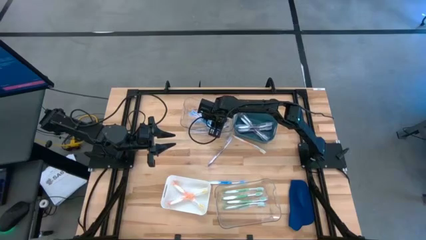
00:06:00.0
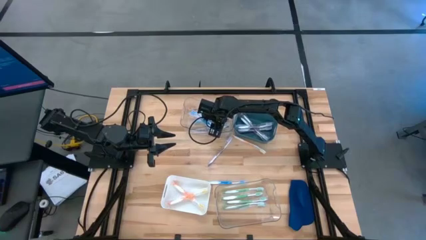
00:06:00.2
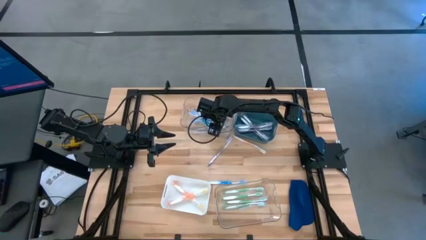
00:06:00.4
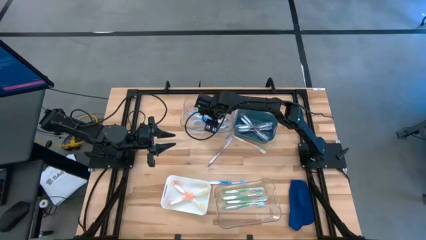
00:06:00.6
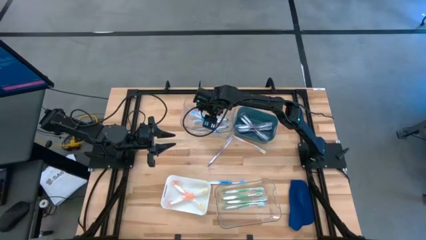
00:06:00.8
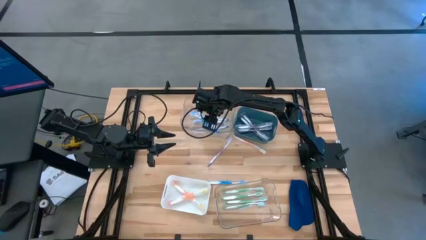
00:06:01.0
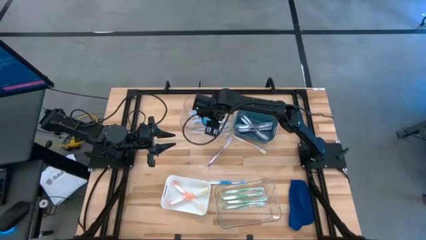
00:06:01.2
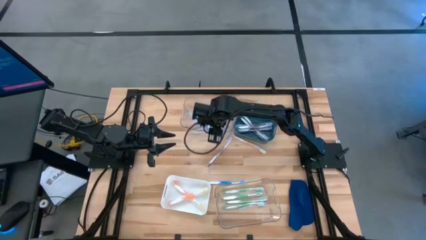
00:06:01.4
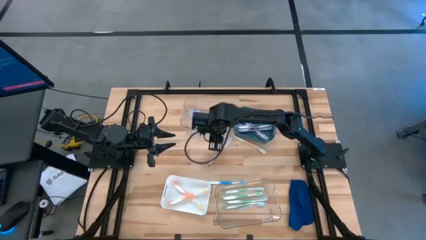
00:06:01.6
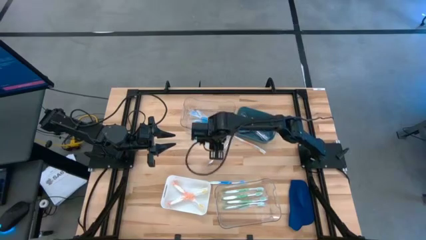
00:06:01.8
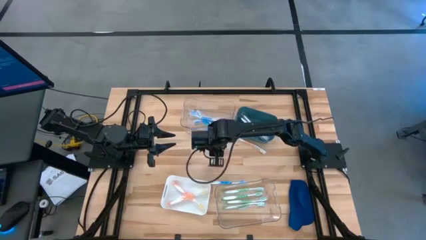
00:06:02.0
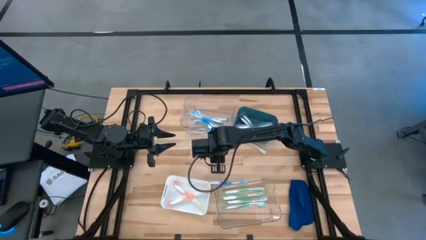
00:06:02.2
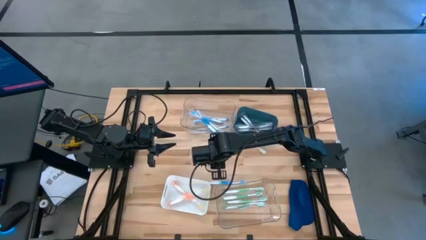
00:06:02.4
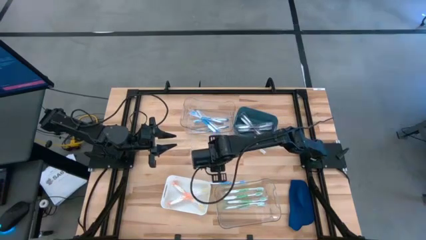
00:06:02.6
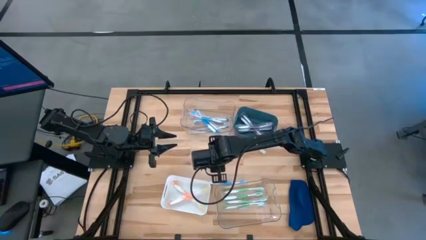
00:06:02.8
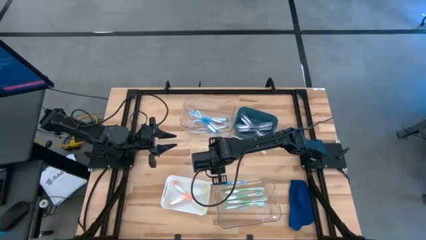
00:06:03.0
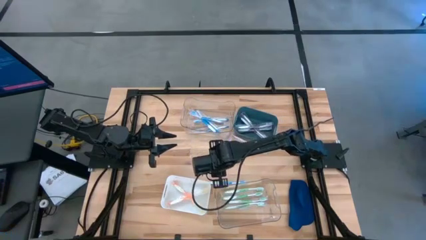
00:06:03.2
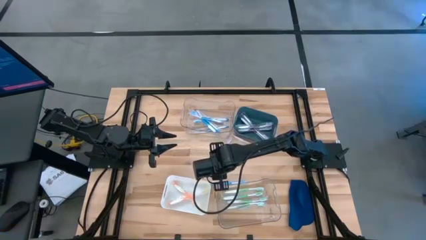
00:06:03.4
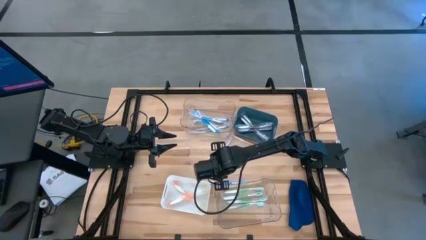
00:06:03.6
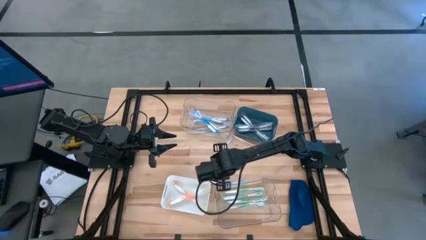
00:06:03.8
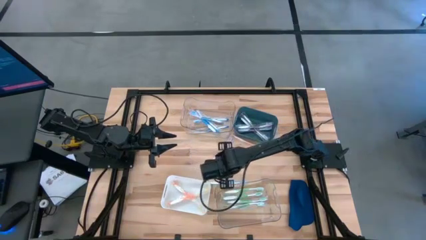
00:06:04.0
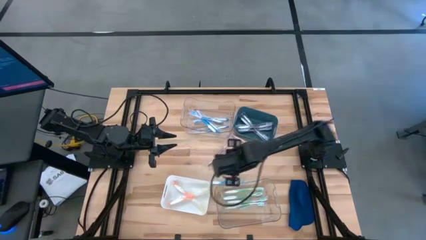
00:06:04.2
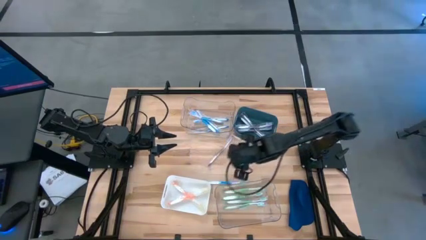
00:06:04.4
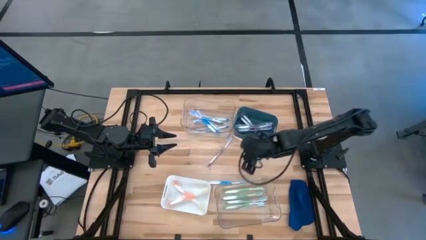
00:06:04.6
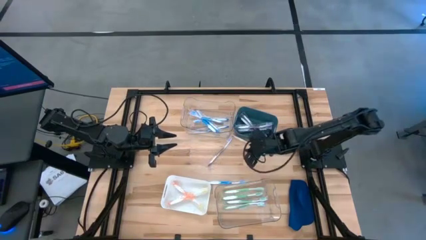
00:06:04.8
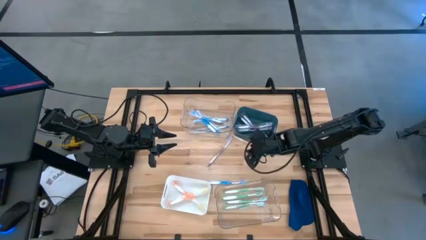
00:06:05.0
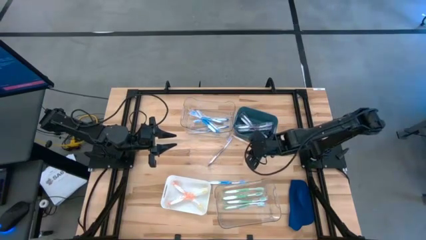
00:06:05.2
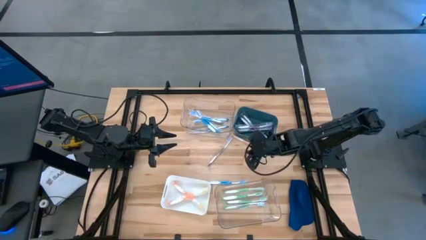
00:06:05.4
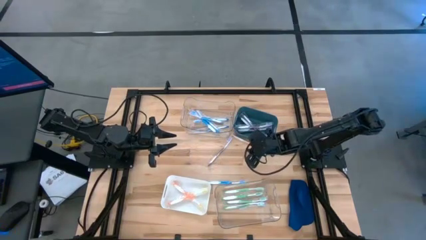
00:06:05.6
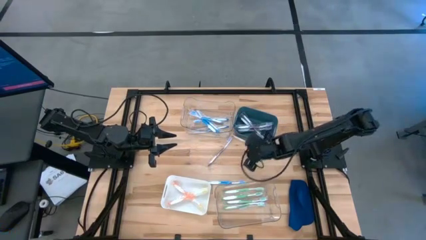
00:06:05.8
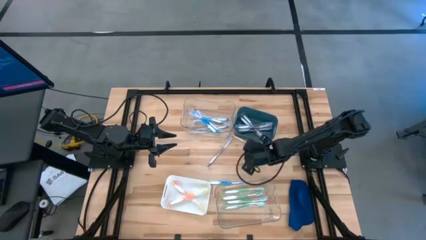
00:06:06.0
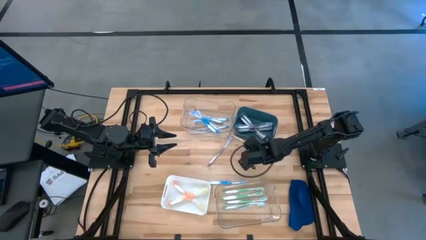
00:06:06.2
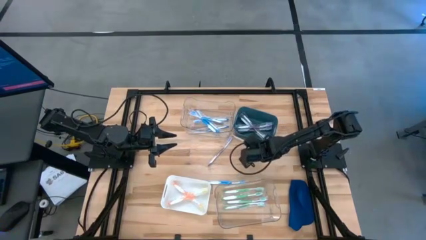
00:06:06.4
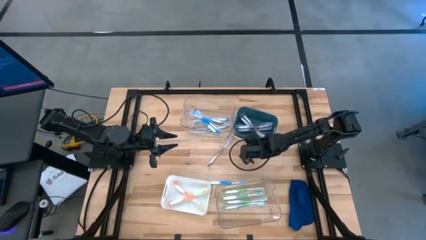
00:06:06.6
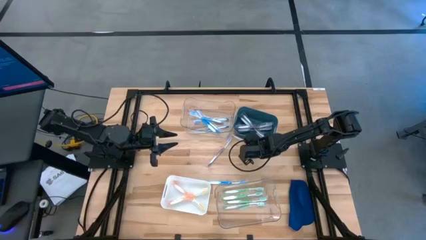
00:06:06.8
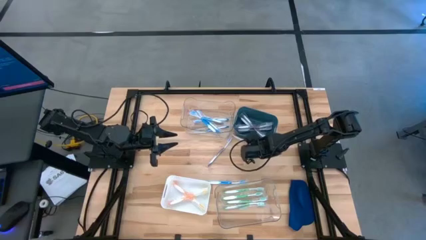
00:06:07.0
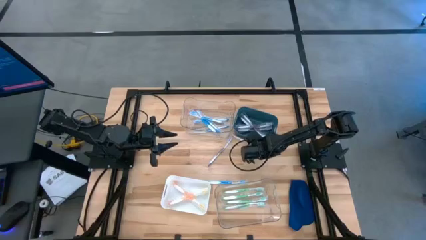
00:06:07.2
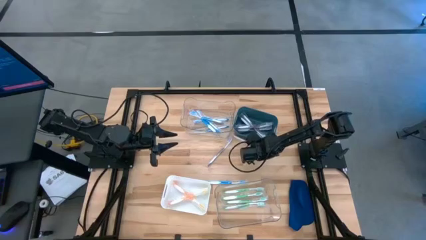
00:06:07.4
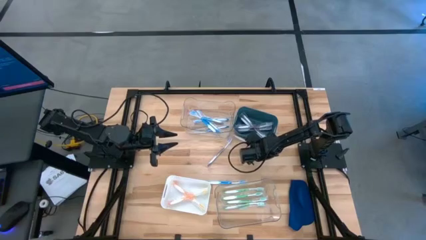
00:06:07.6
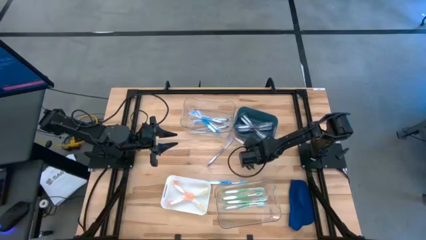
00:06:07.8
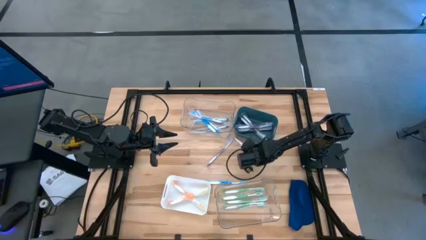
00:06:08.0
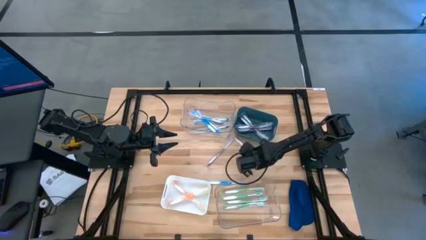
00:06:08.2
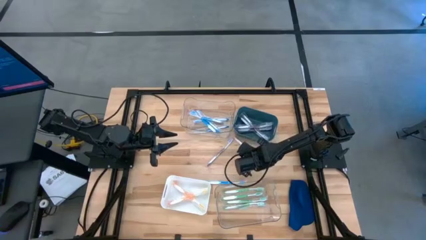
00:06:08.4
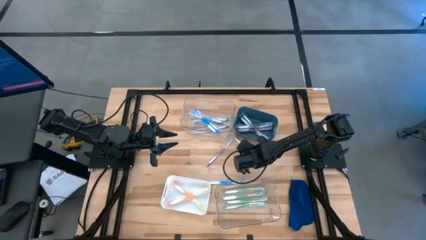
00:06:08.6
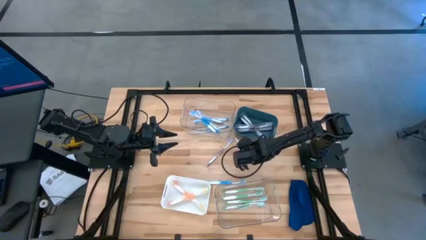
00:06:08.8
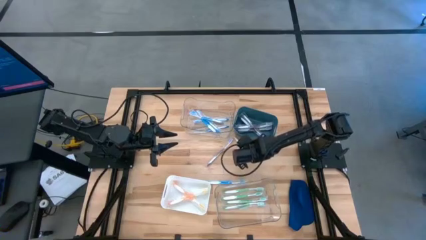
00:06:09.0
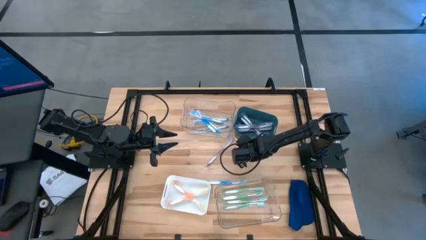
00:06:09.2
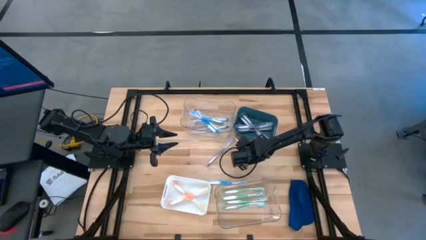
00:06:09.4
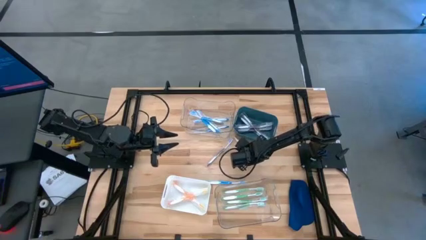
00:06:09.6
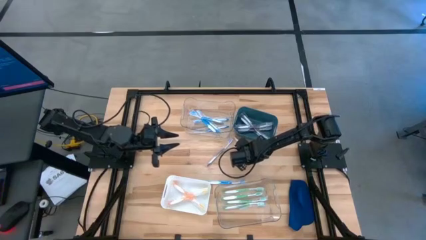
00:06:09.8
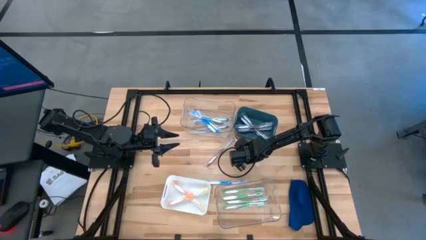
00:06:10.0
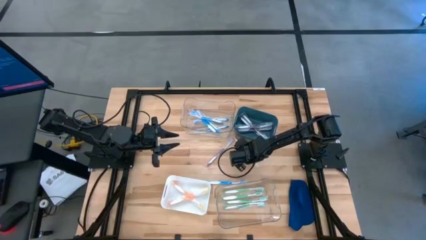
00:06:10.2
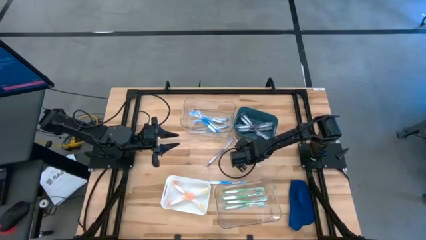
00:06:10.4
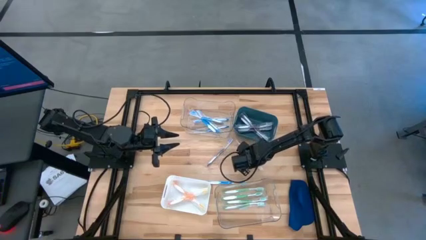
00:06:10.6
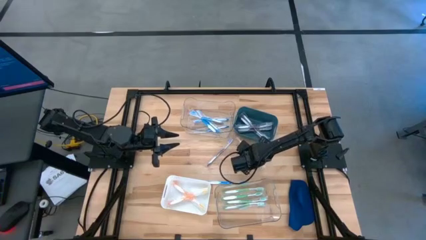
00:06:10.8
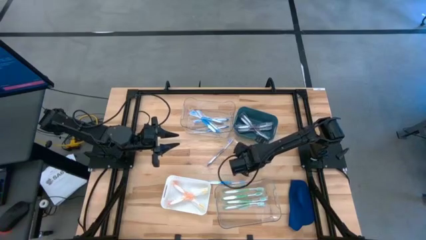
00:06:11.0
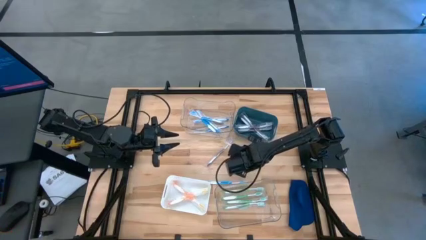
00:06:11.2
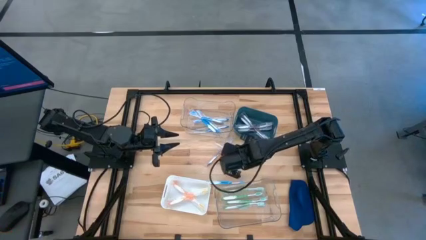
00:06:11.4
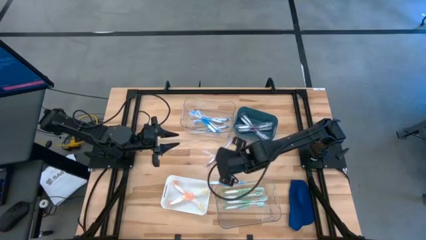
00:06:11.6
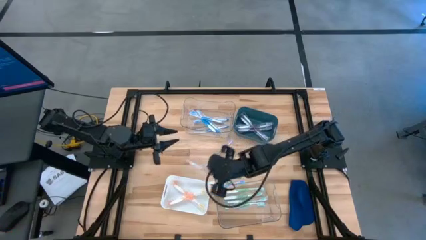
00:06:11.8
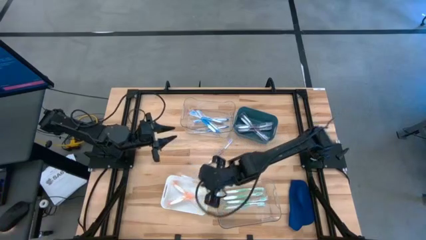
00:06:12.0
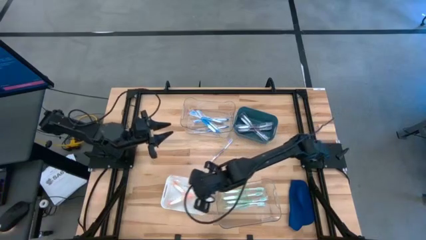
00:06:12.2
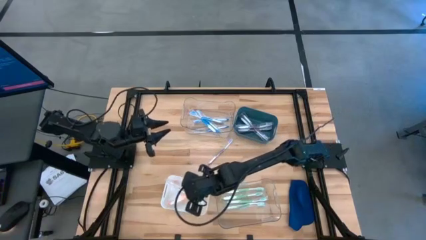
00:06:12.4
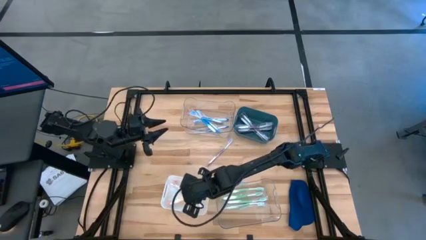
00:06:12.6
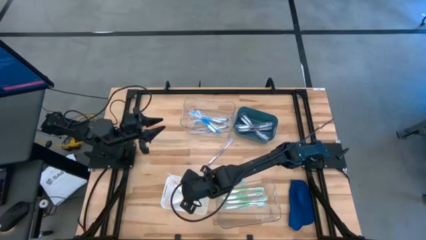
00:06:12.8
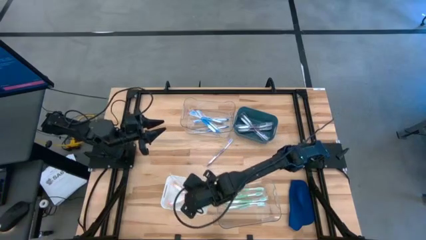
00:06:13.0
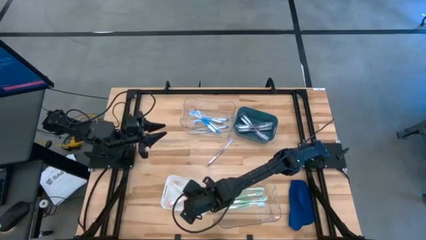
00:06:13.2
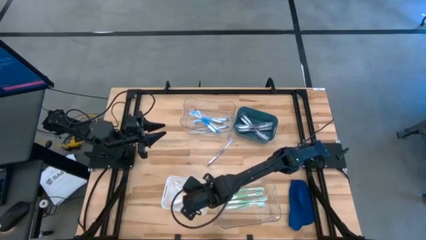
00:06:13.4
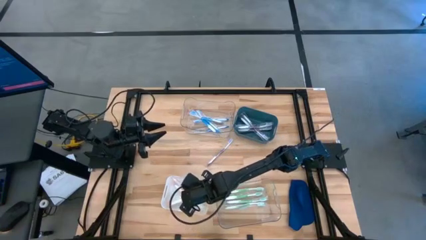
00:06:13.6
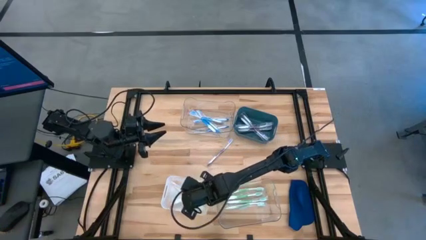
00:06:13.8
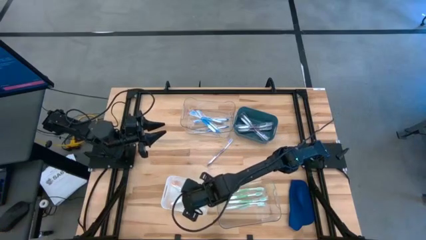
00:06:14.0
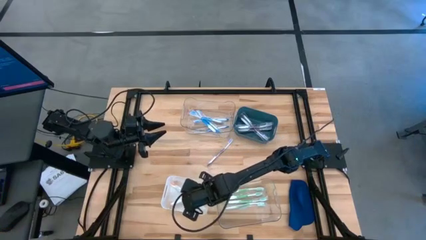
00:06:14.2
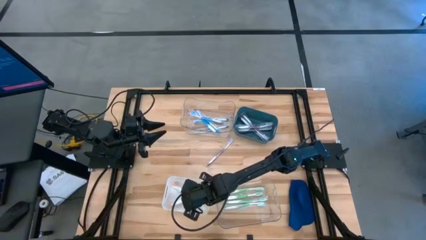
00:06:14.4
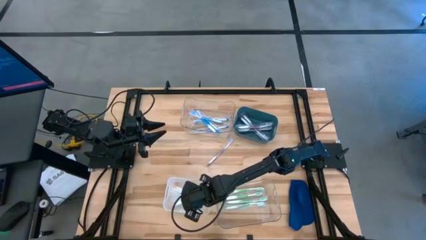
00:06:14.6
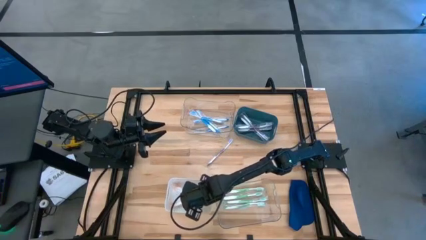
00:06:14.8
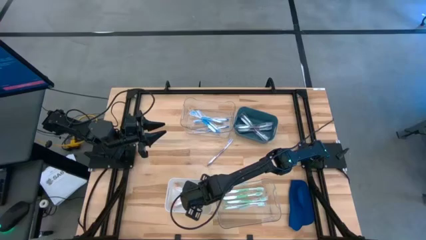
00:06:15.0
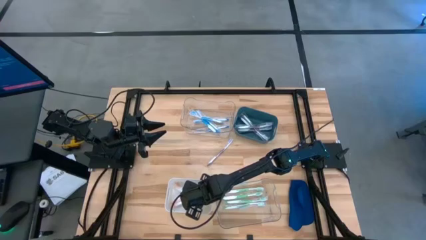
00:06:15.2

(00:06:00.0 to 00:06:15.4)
Task: Pick & Place Toothbrushes
Put the orange toothbrush into the white bin
